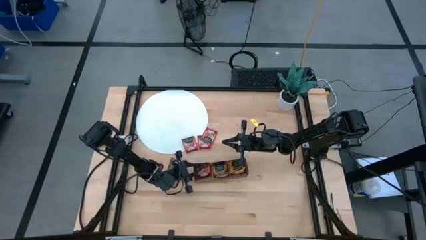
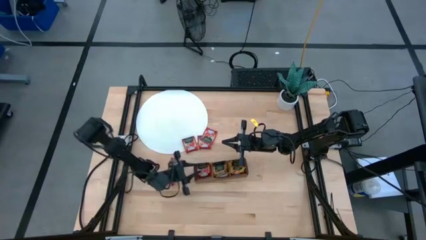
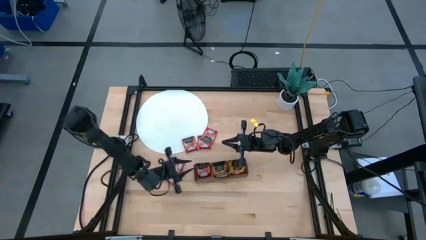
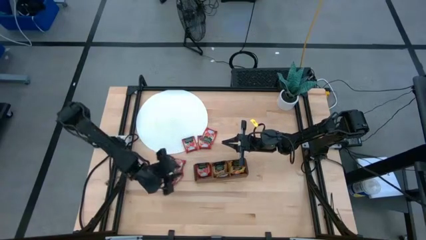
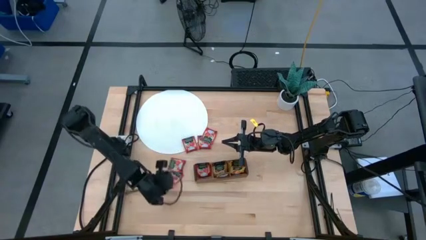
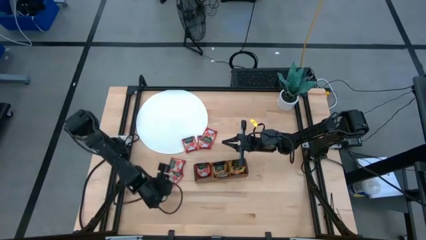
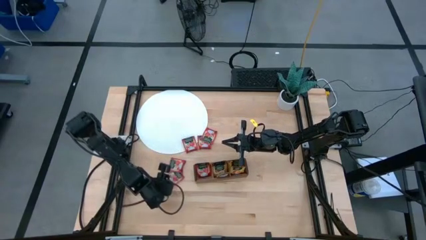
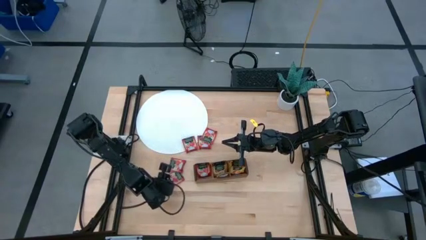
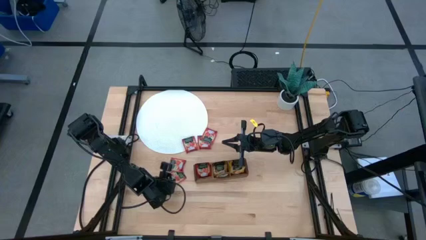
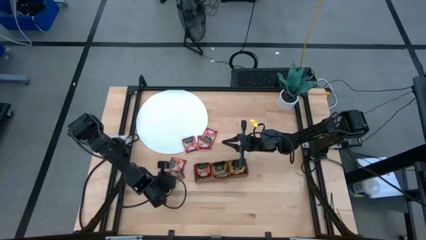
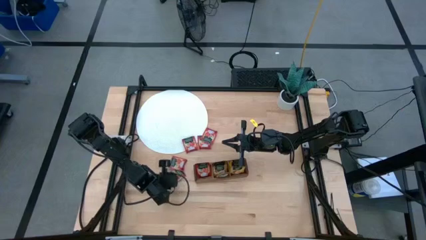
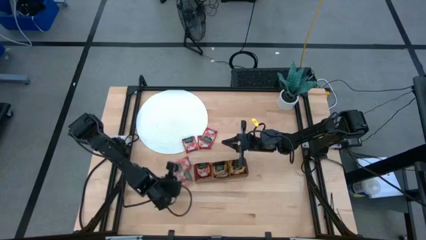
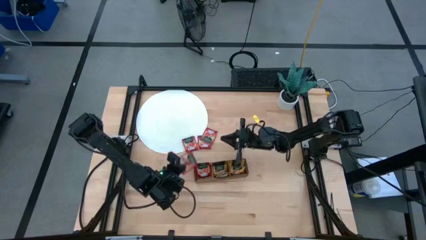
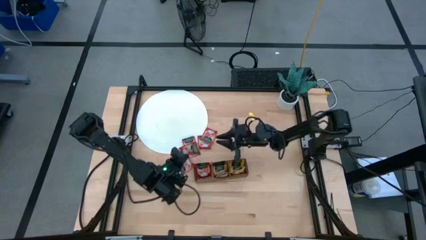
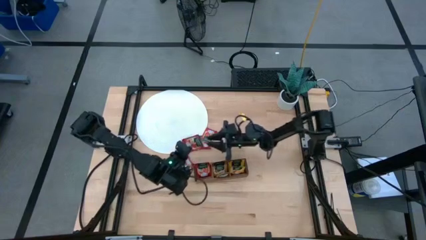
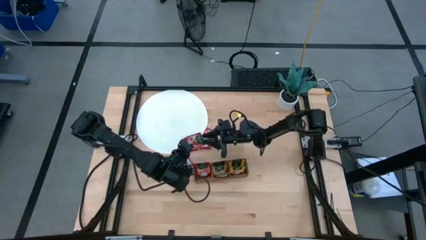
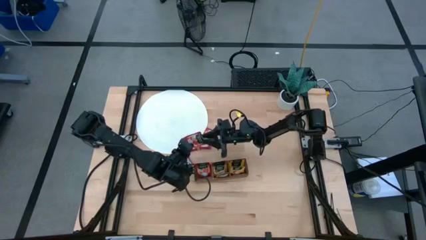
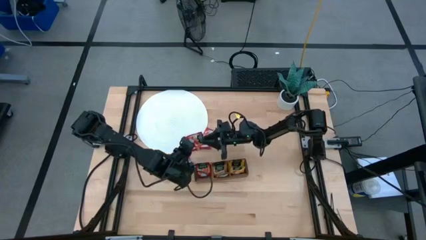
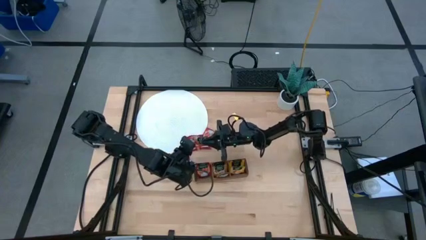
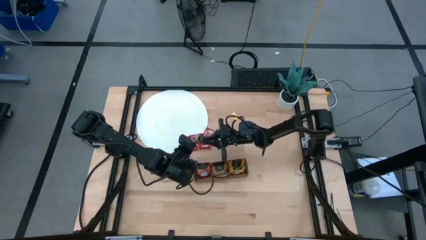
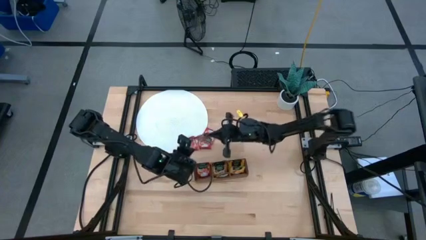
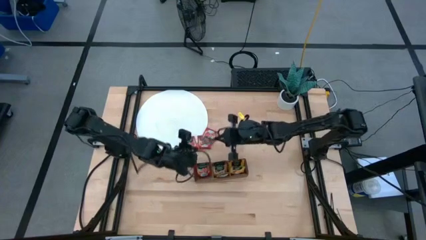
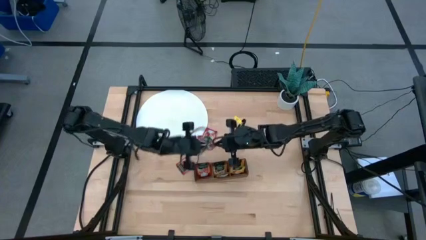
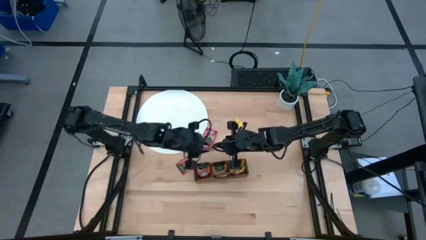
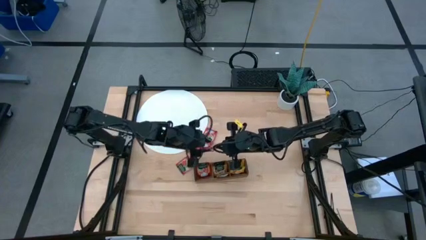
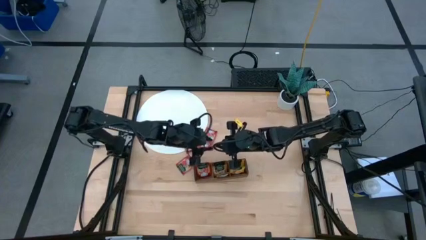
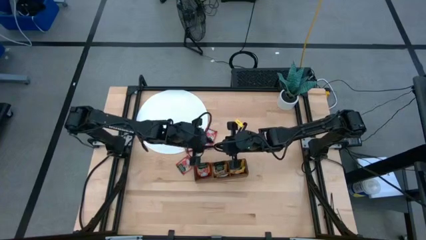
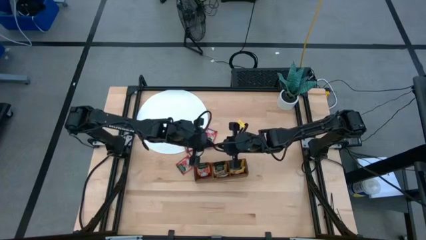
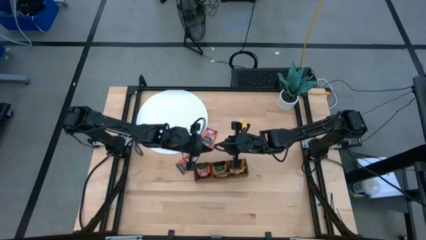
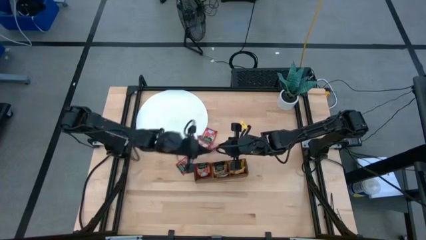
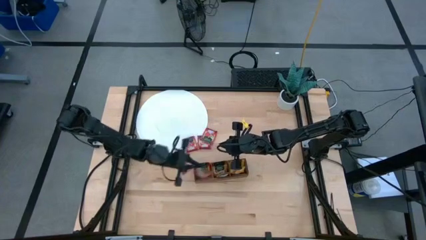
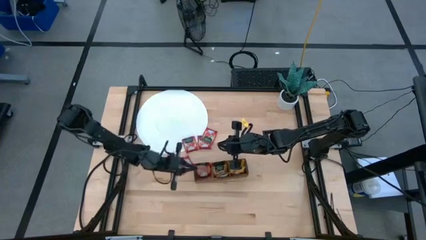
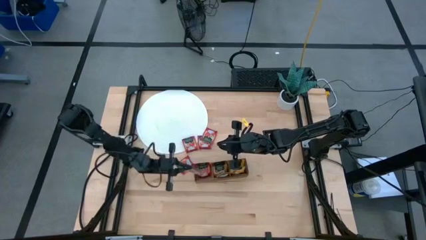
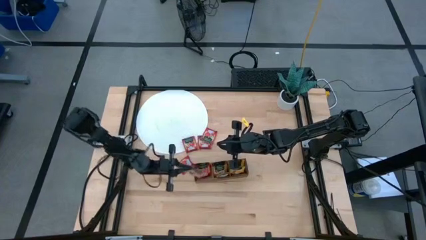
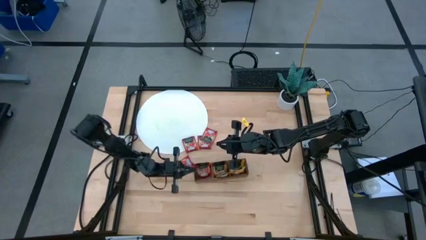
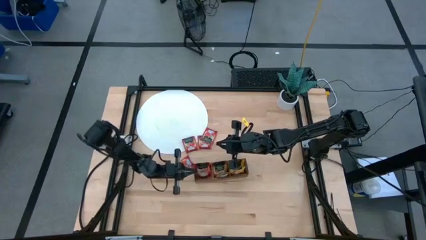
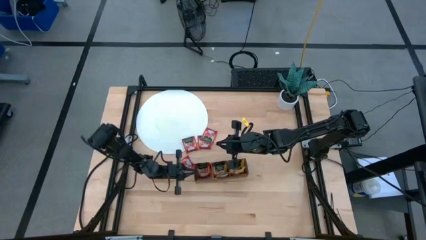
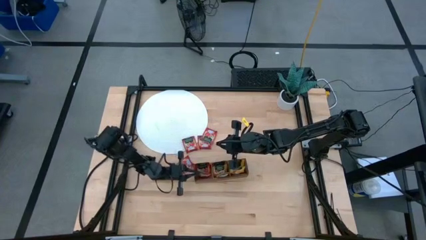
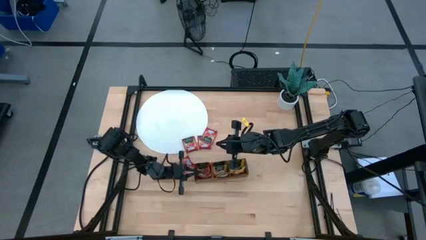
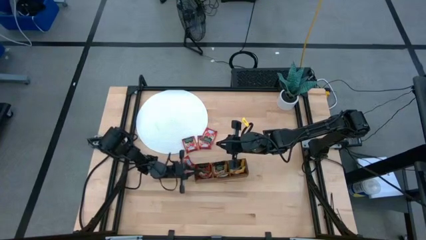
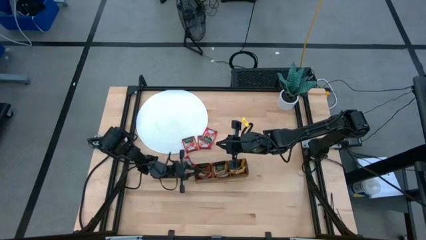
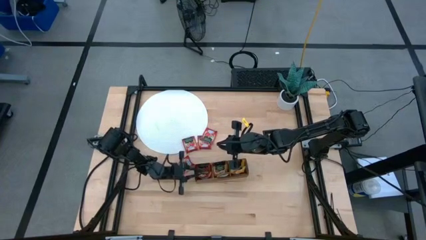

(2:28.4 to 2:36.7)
Task: Pick & Place Tea
Put the red tea bag into the left section of the wooden organizer

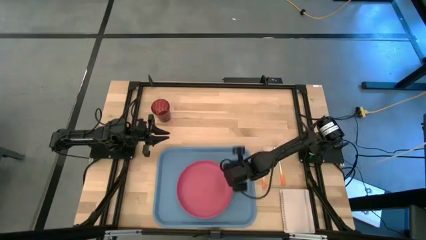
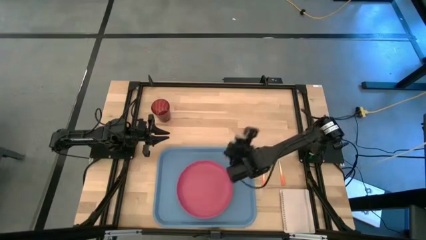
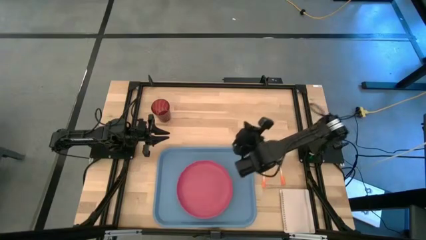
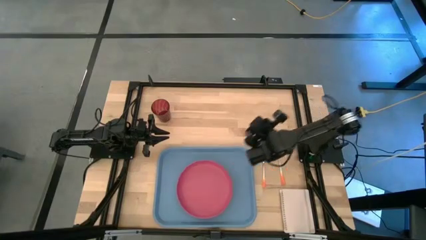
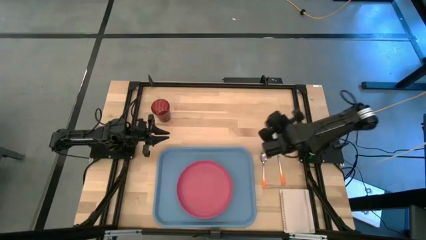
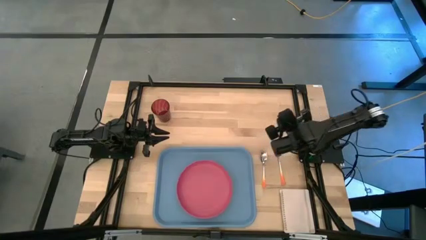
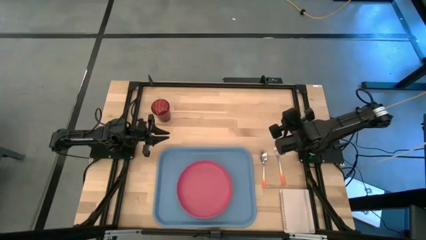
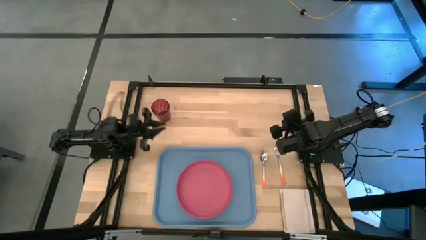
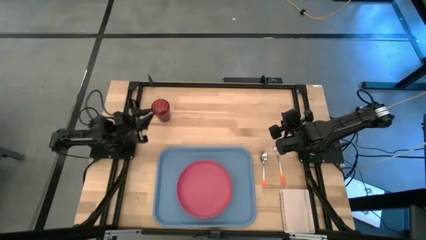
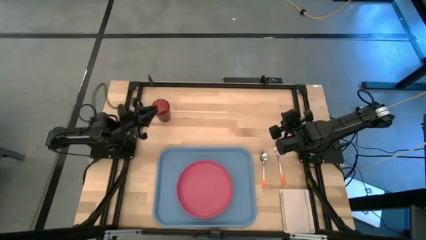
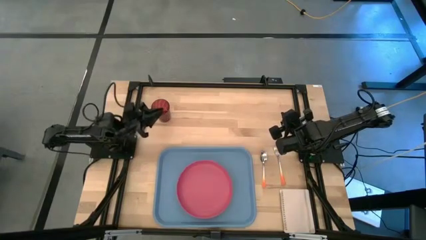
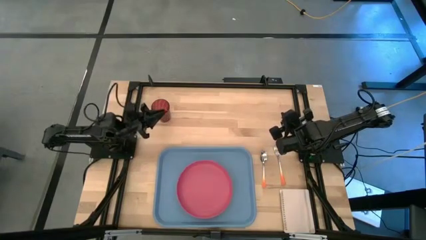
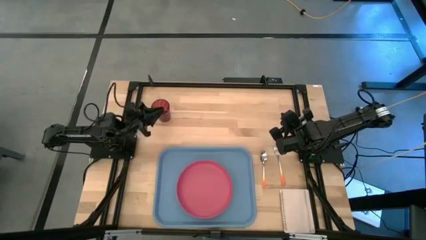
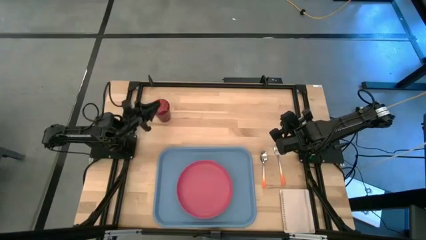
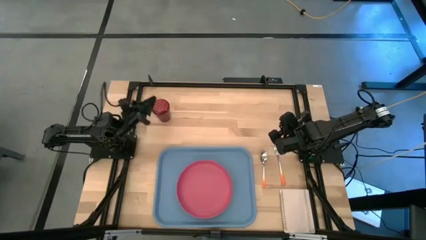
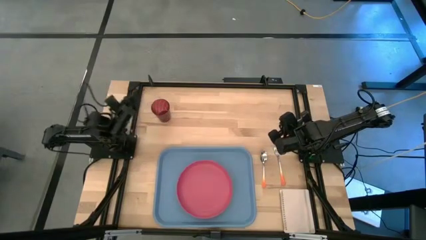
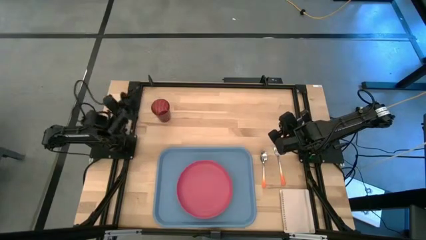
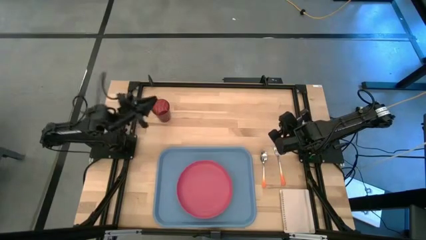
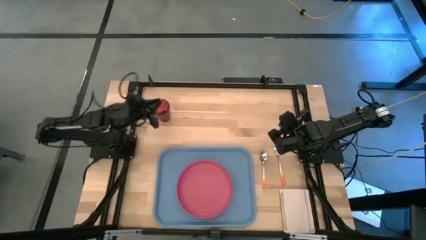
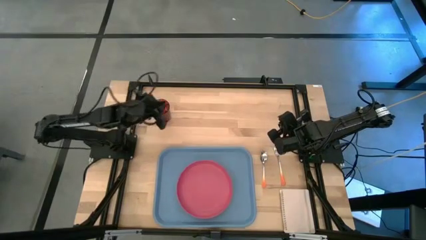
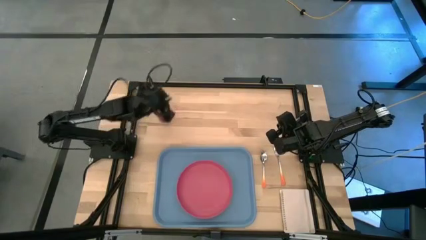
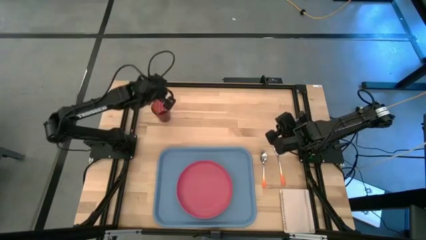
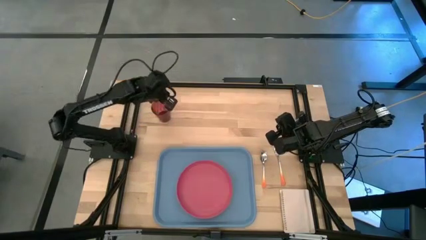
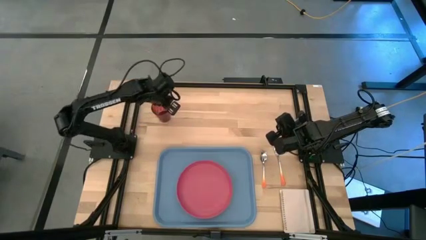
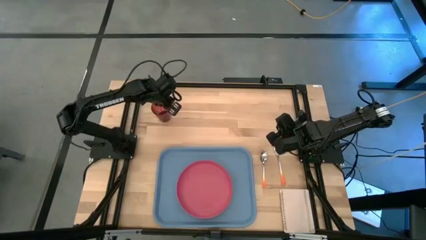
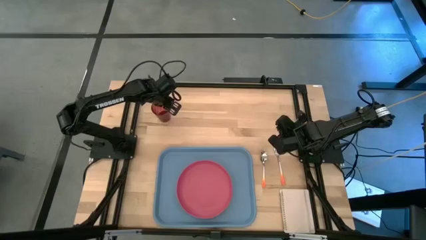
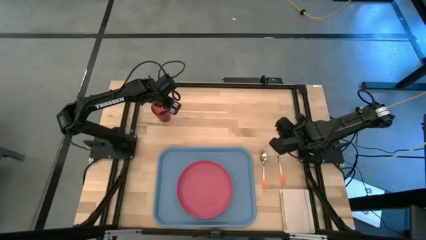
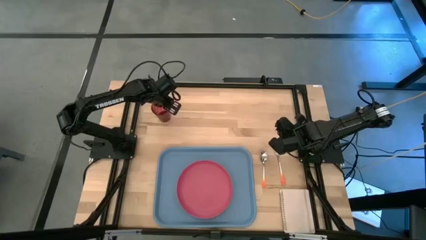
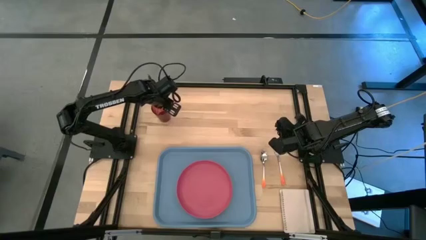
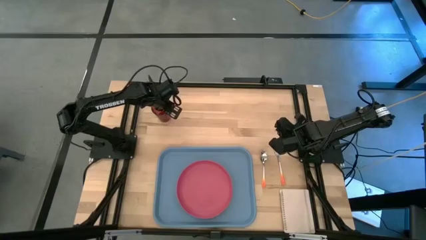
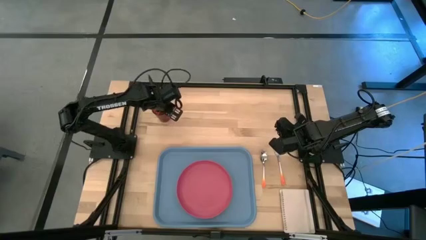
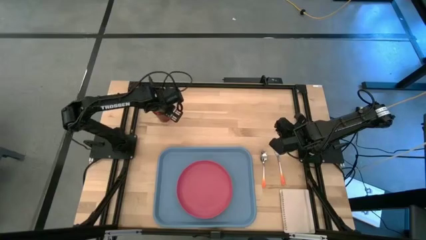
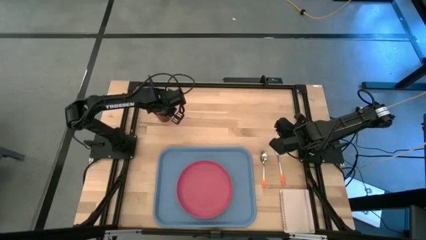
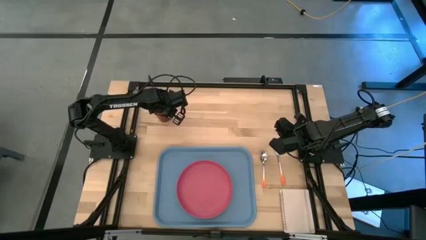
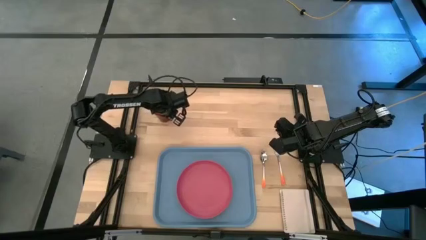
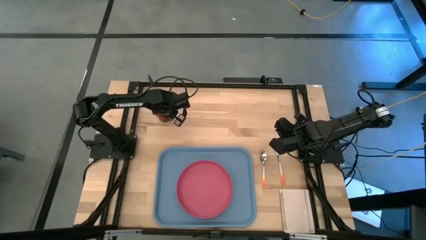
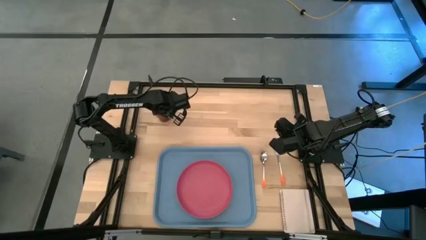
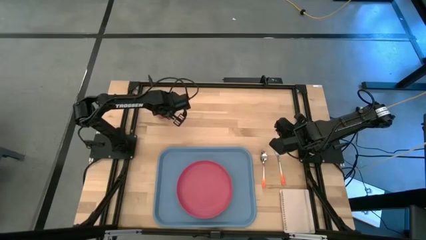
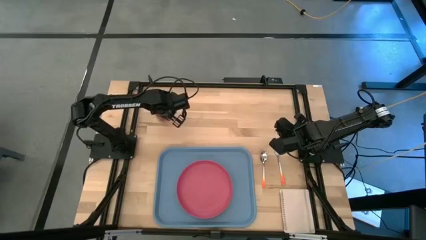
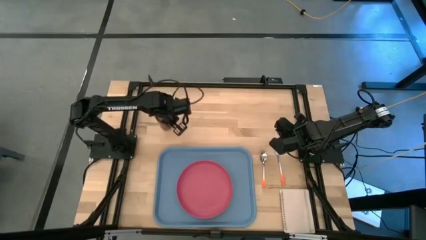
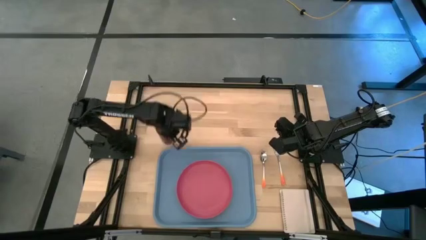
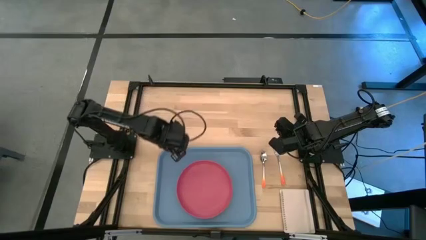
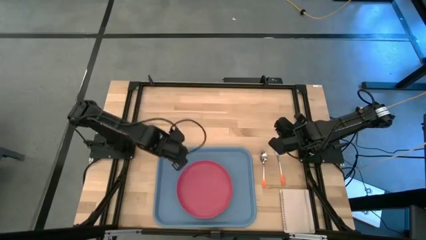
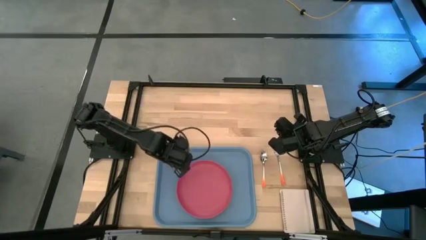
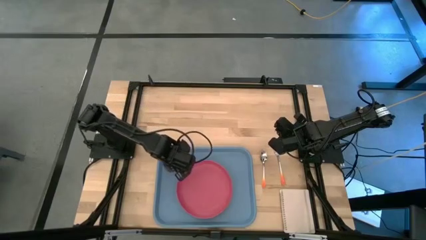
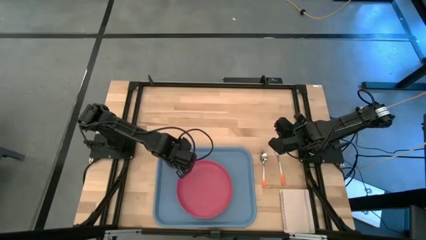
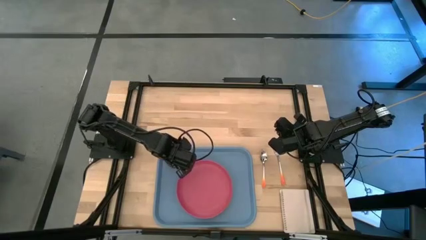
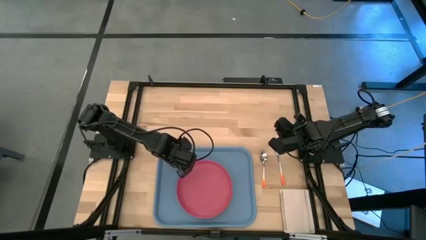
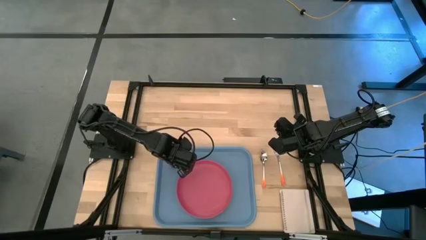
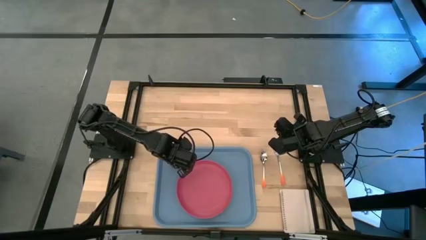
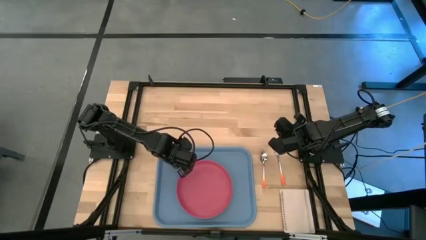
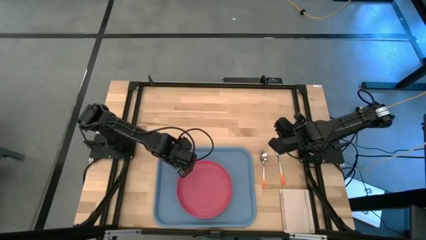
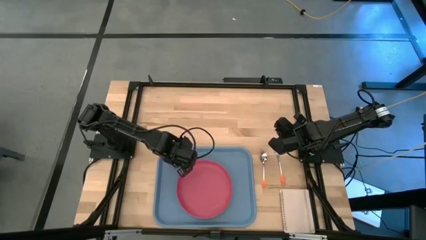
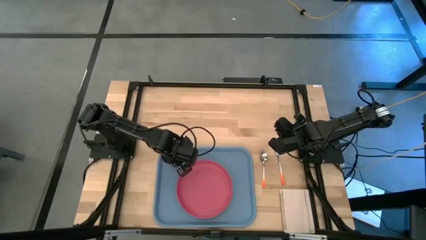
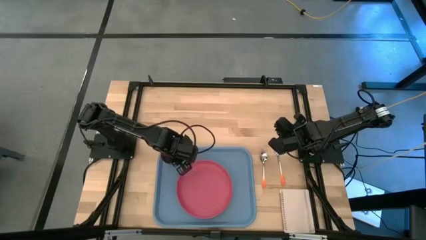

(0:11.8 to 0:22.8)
Task: Pick and place plate/cup/fork/spoon on tray
Put the purple cup on the serving tray to the top left
